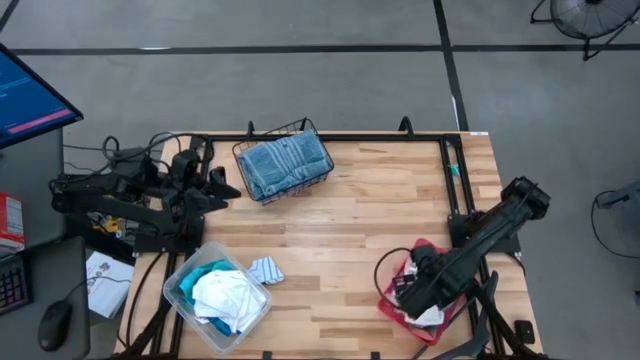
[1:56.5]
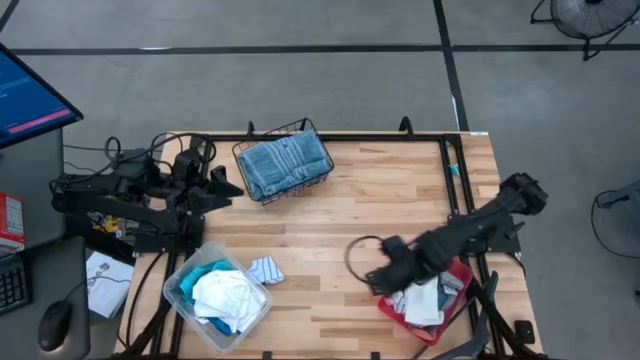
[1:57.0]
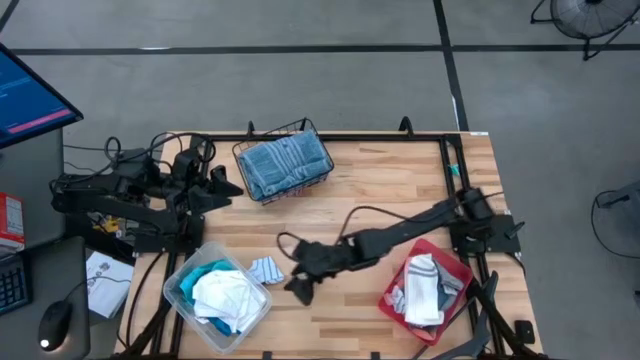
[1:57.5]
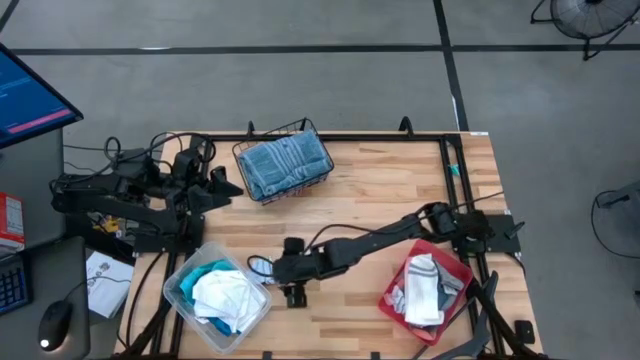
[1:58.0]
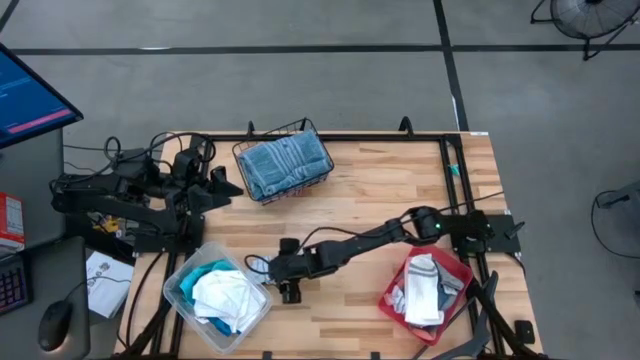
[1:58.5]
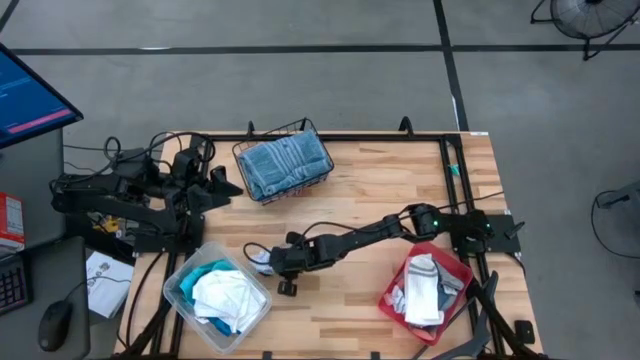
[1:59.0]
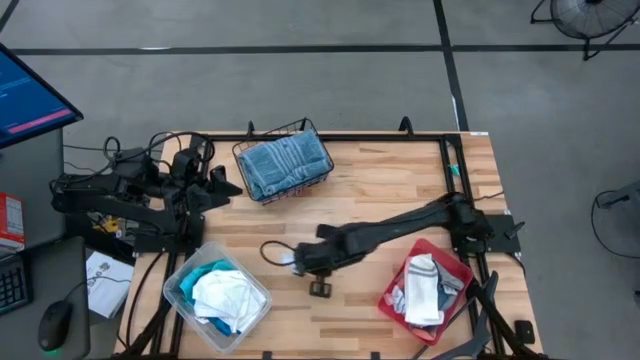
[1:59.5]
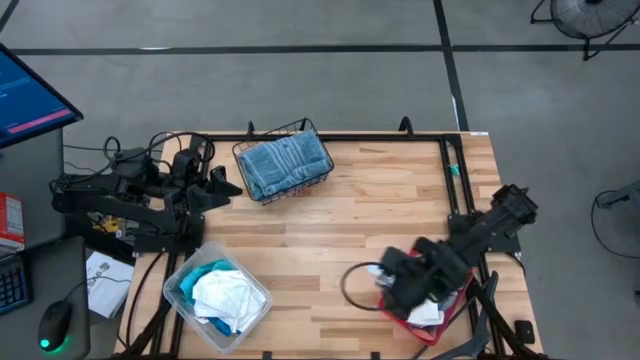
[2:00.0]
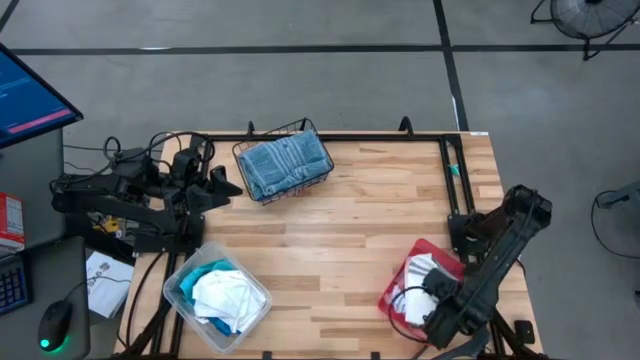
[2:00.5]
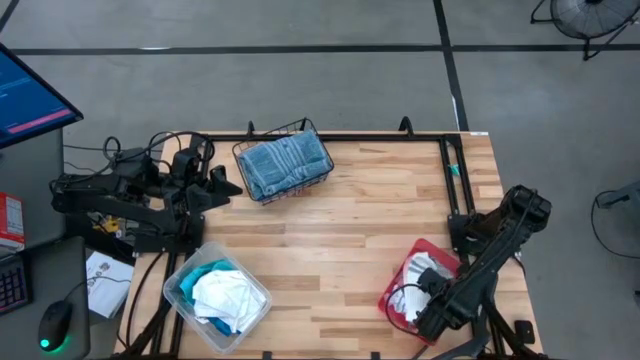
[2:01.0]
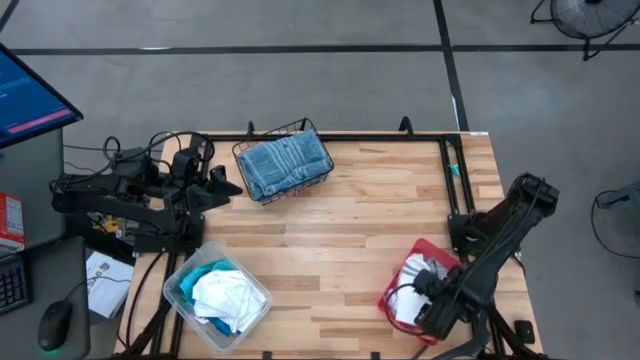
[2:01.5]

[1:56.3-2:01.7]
Task: Pick & Place Cloths
Put the white patterned sock into the red bin

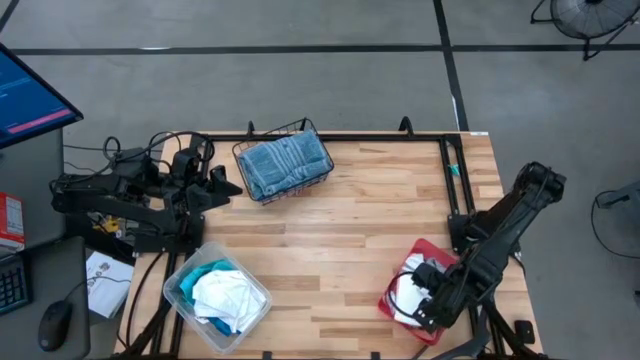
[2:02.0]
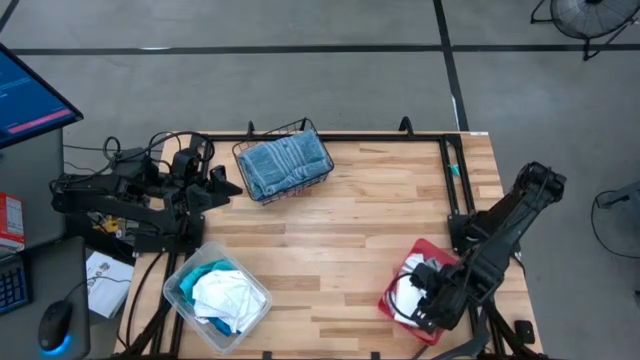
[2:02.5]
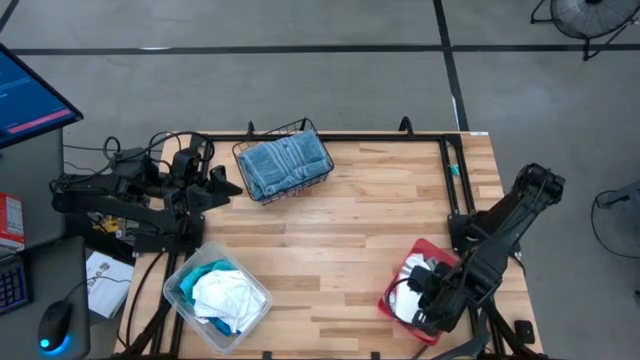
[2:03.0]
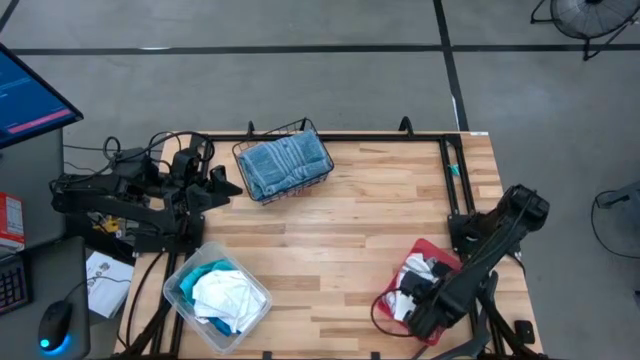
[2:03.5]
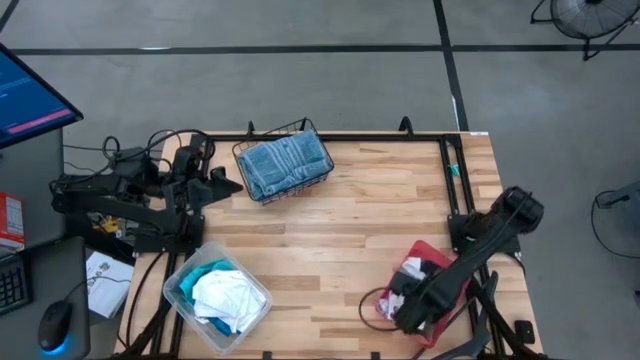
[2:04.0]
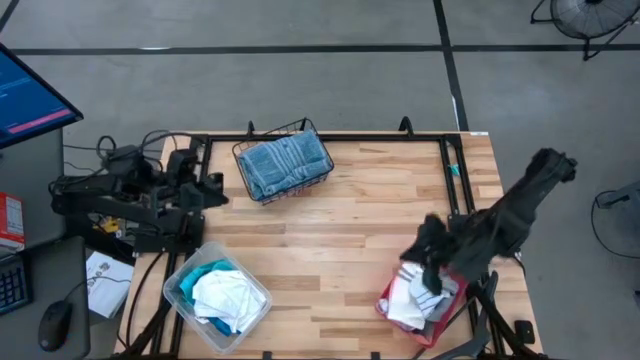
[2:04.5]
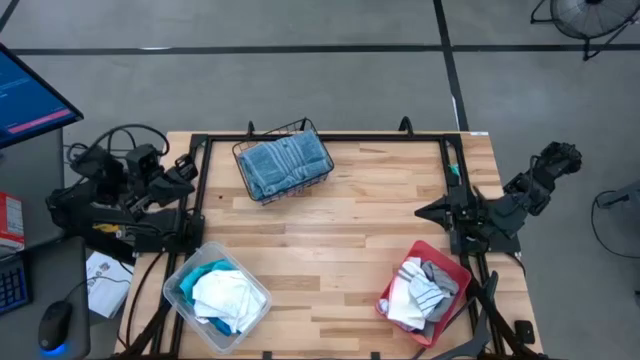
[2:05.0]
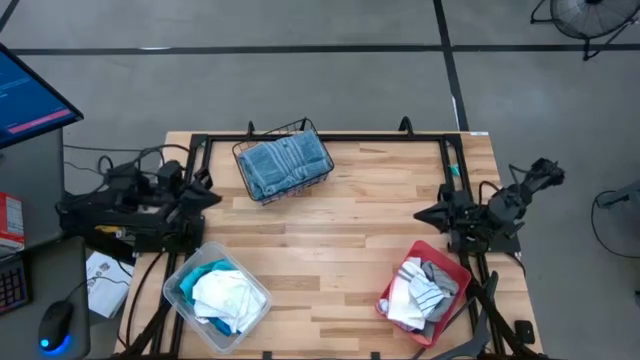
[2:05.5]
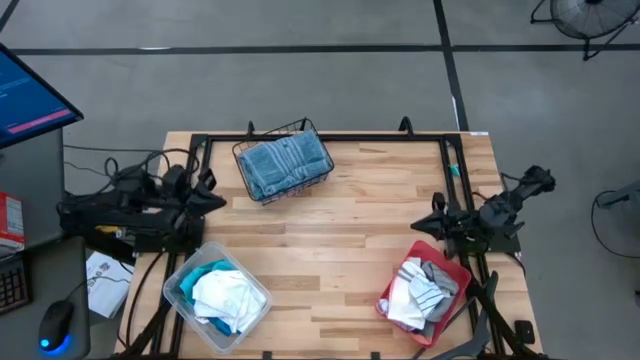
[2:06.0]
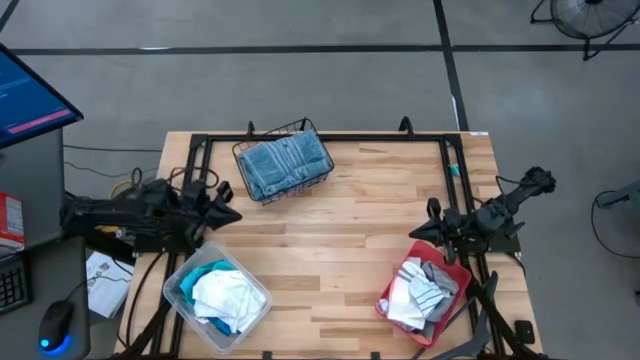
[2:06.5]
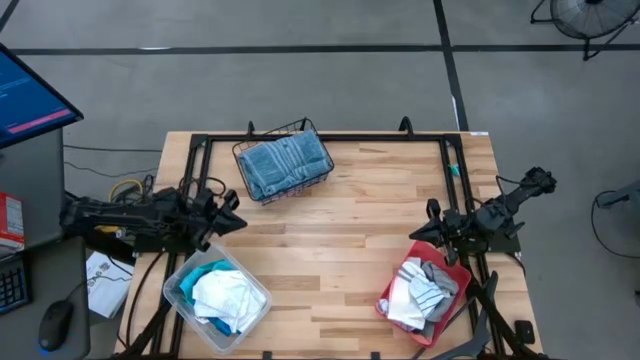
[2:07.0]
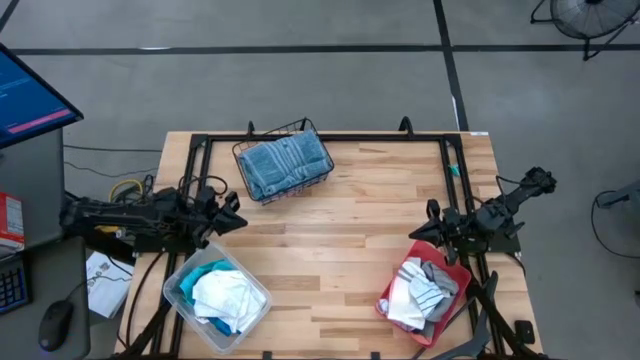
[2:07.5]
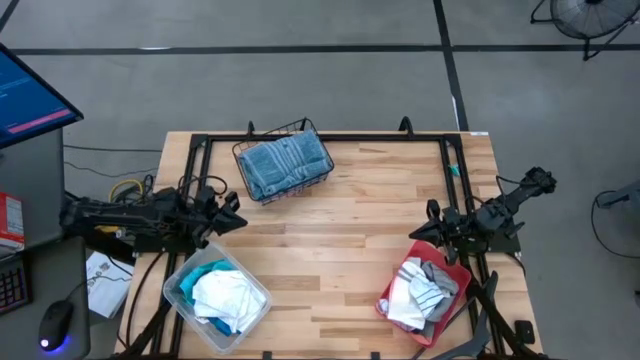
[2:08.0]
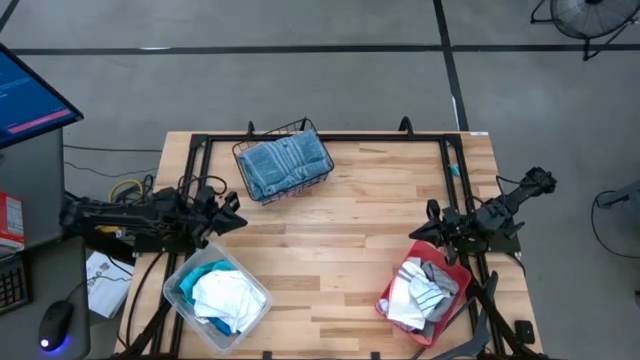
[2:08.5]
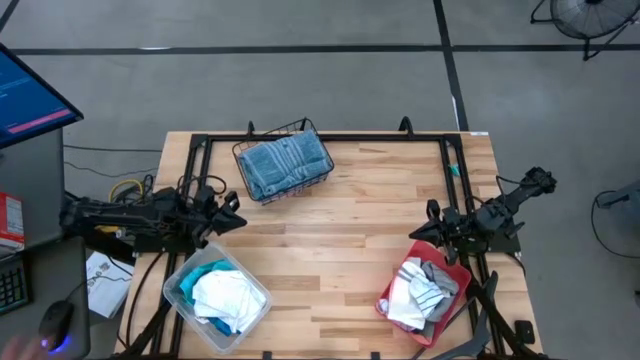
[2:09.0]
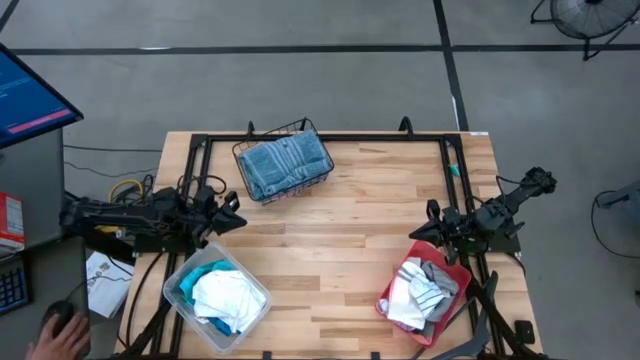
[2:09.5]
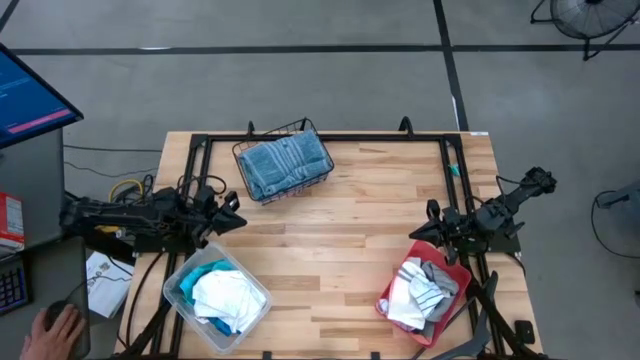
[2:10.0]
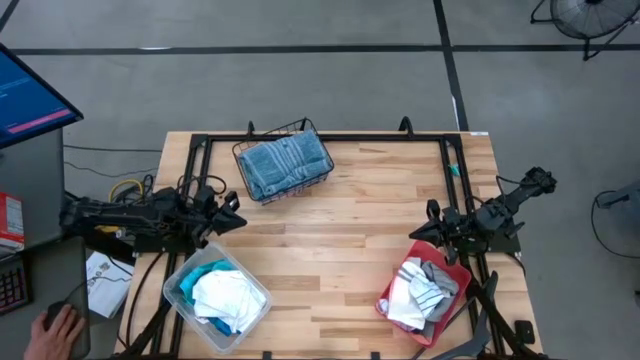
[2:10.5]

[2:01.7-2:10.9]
Return to Home Position

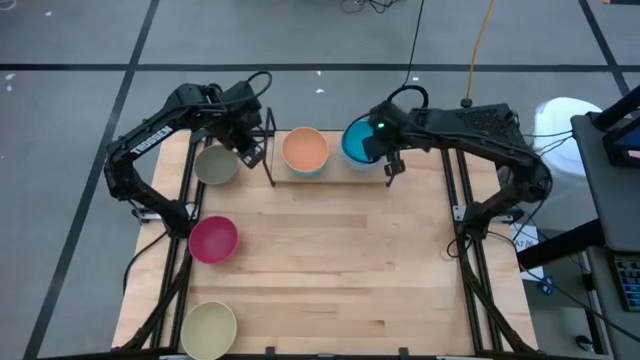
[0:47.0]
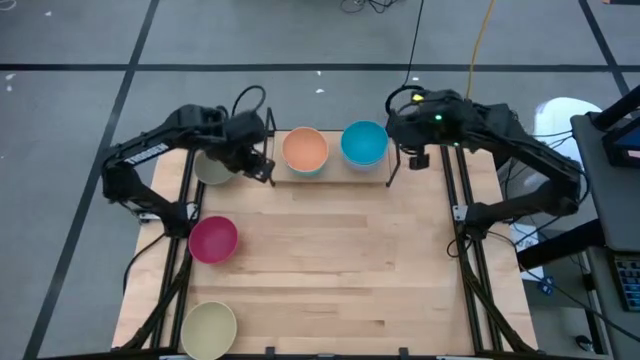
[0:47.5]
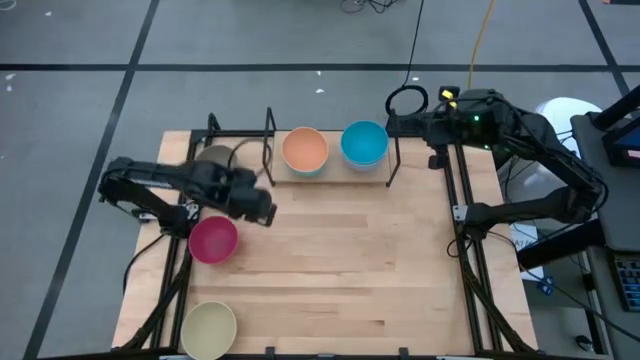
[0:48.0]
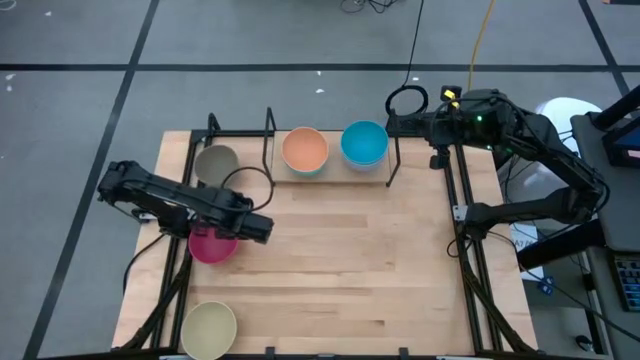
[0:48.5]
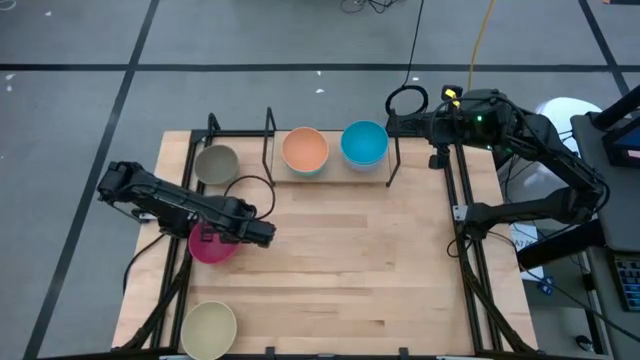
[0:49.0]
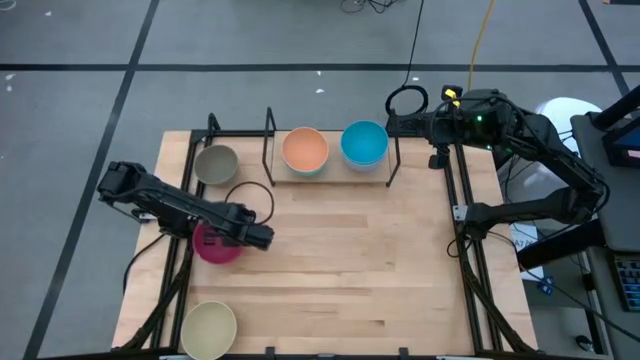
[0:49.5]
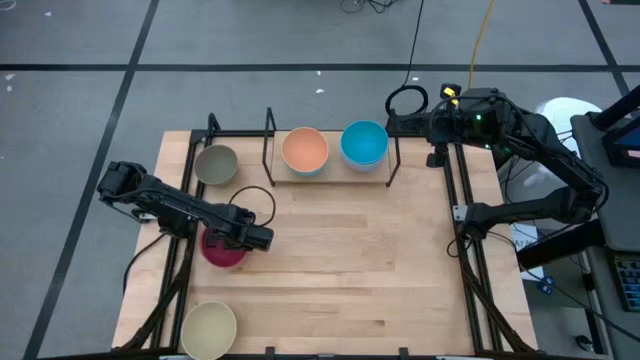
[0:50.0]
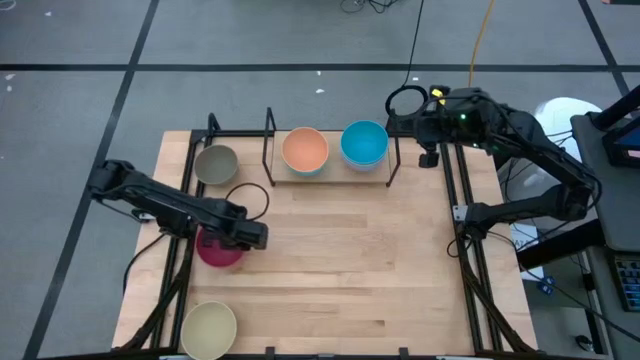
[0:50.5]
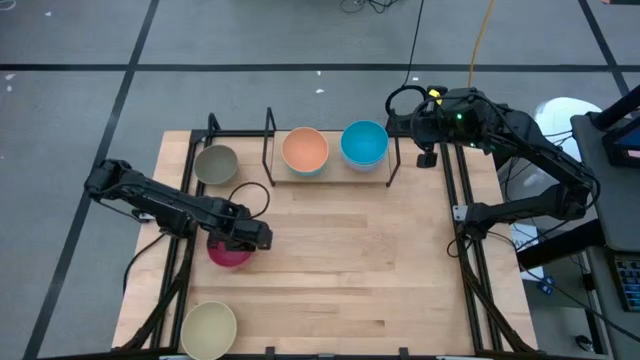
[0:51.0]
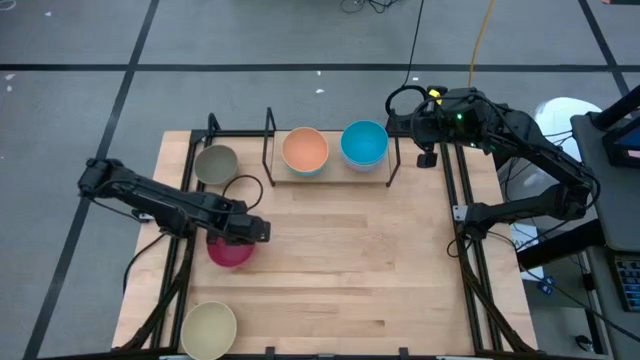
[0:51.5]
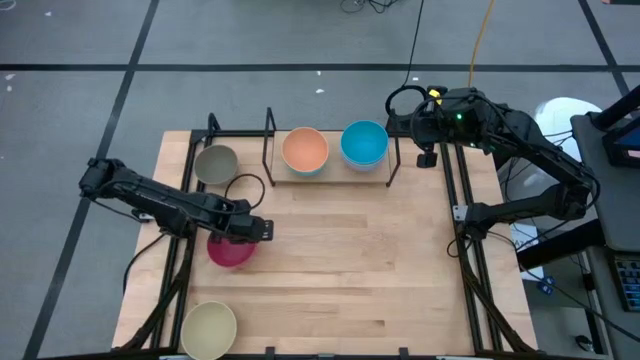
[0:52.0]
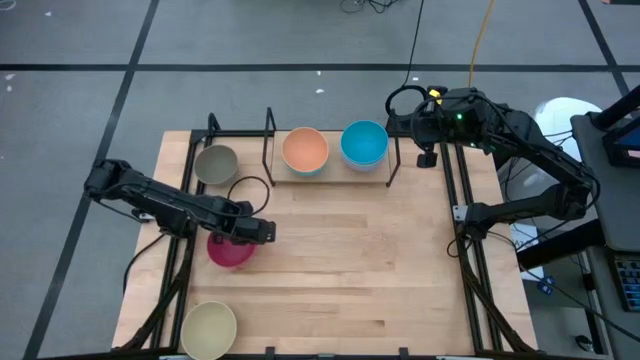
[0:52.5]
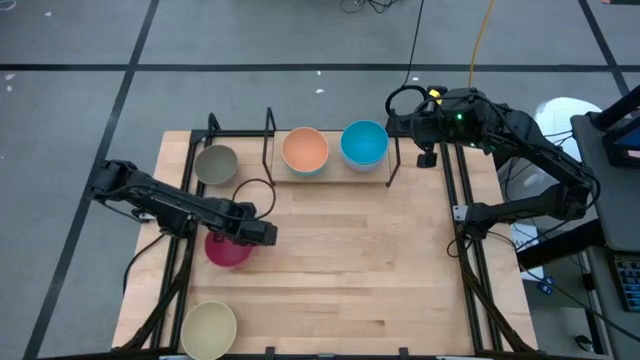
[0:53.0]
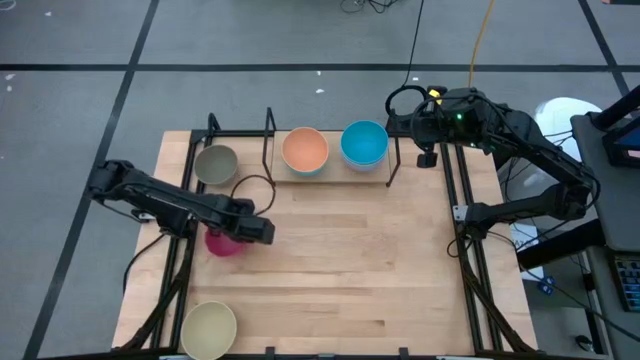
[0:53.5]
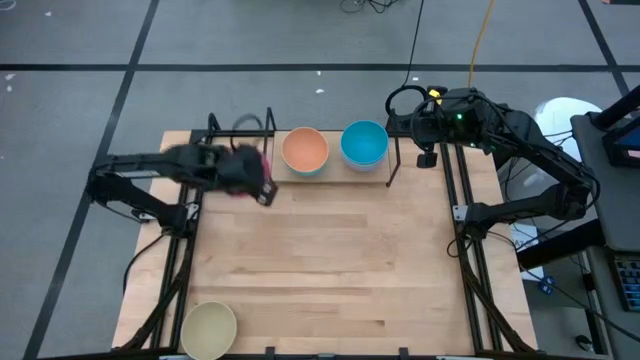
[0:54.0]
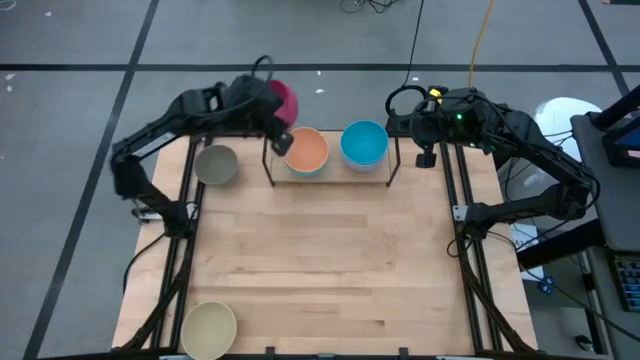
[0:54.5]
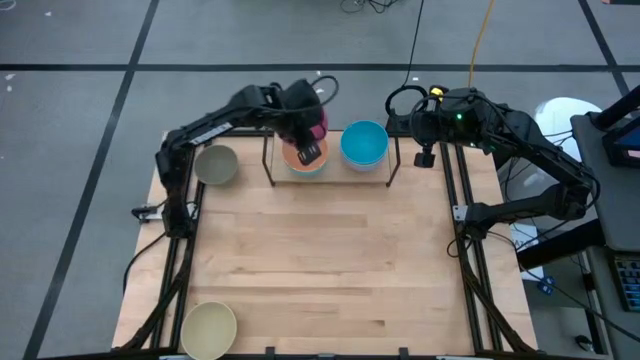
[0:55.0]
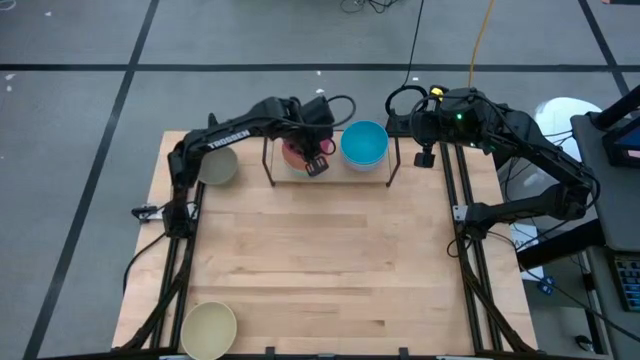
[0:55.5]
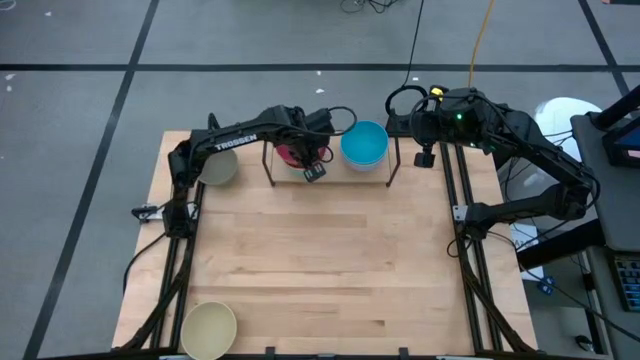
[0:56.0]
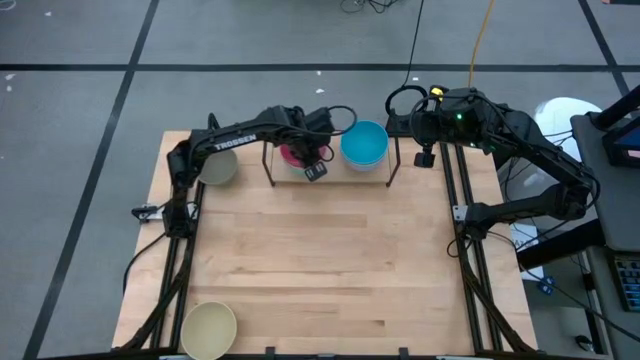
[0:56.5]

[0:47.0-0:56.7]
Task: Place and stack bowls onto a shelf
Stack the red bowl on top of the orange bowl on the shelf
